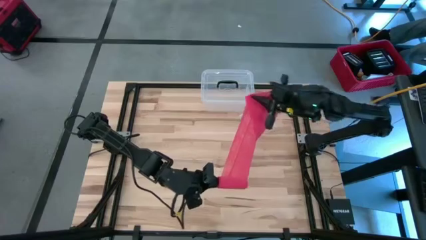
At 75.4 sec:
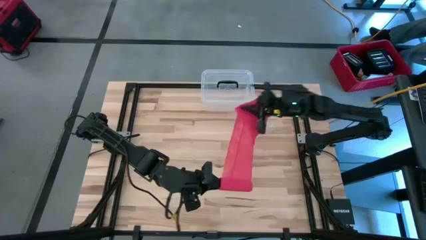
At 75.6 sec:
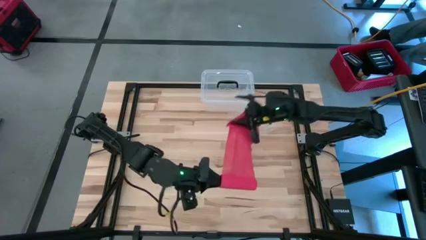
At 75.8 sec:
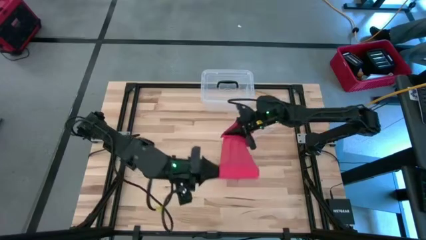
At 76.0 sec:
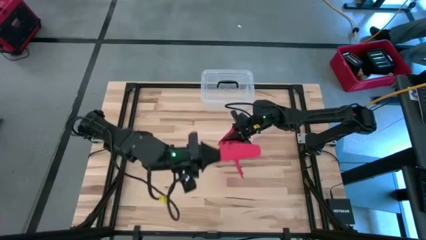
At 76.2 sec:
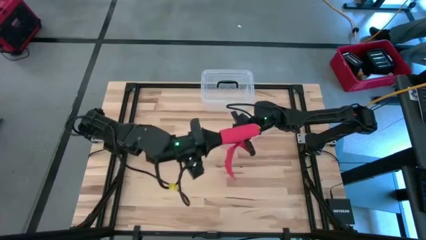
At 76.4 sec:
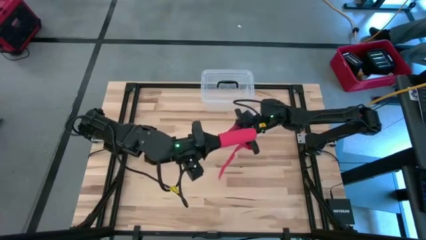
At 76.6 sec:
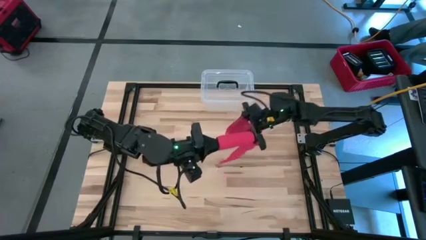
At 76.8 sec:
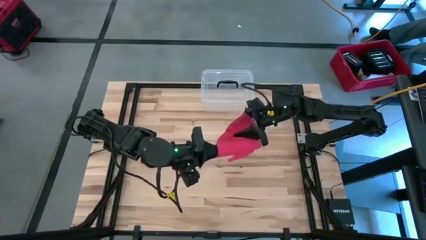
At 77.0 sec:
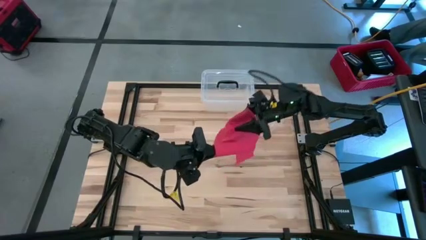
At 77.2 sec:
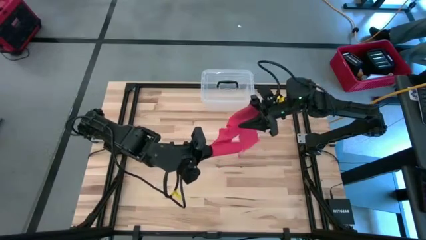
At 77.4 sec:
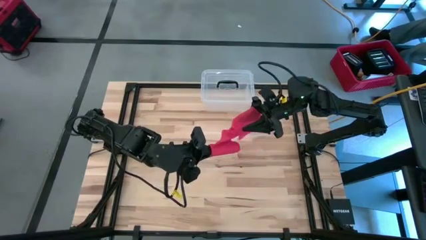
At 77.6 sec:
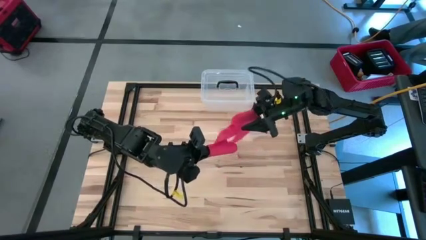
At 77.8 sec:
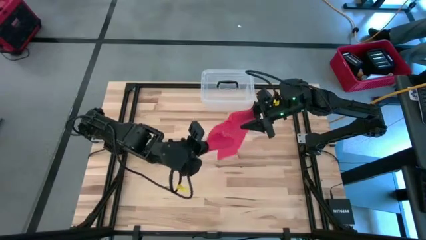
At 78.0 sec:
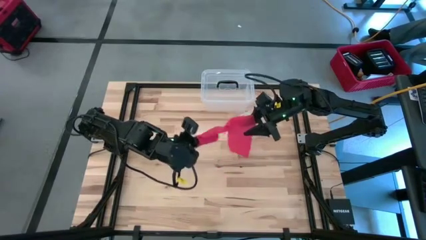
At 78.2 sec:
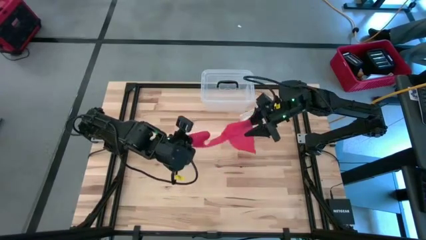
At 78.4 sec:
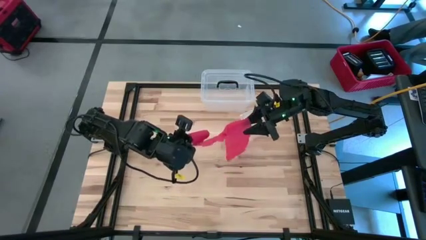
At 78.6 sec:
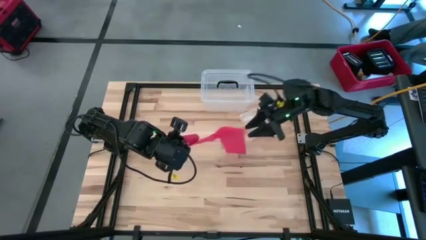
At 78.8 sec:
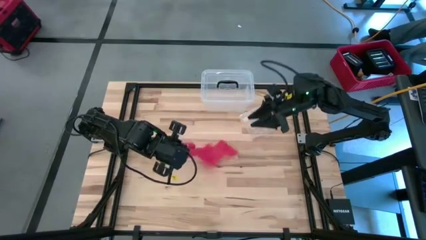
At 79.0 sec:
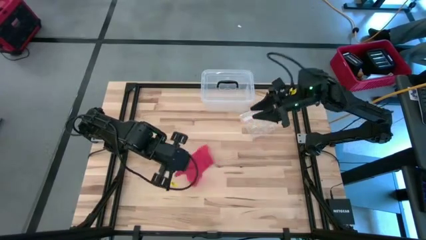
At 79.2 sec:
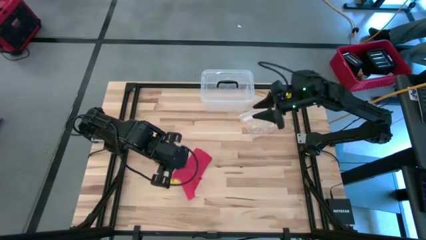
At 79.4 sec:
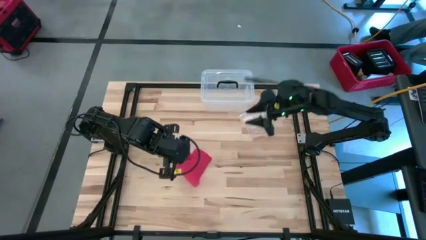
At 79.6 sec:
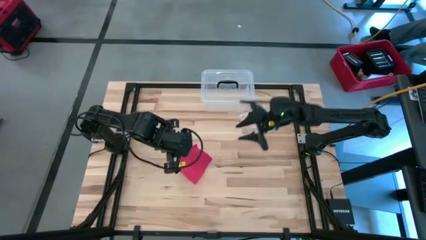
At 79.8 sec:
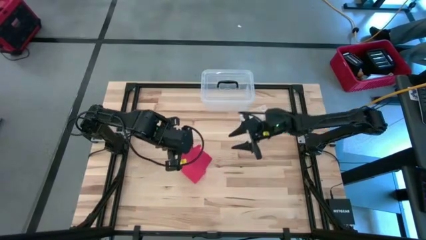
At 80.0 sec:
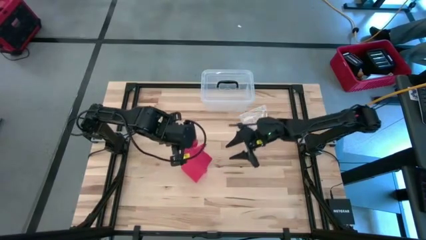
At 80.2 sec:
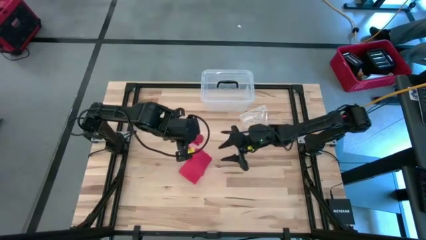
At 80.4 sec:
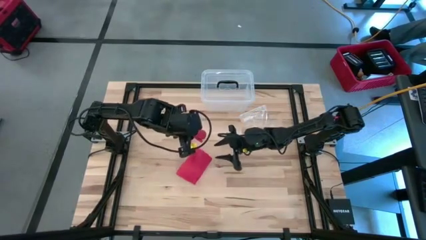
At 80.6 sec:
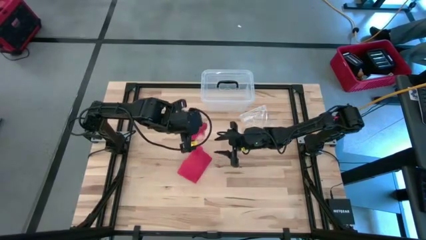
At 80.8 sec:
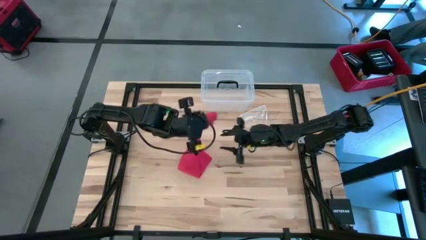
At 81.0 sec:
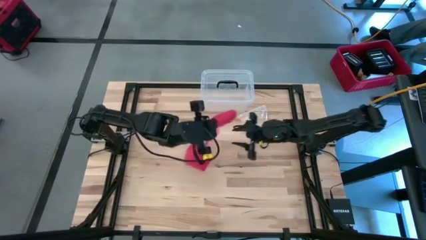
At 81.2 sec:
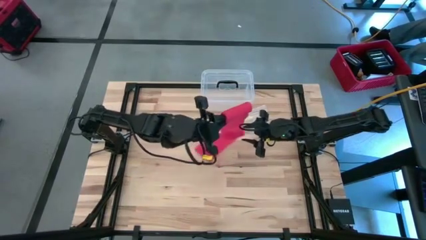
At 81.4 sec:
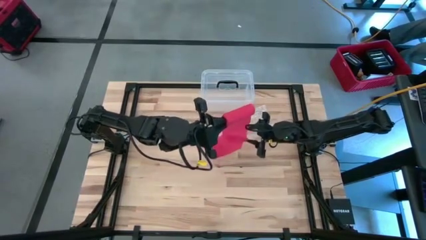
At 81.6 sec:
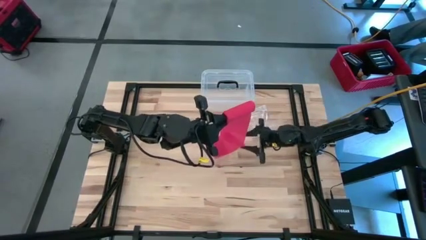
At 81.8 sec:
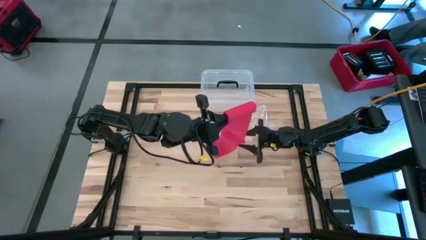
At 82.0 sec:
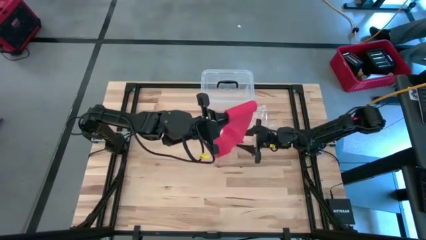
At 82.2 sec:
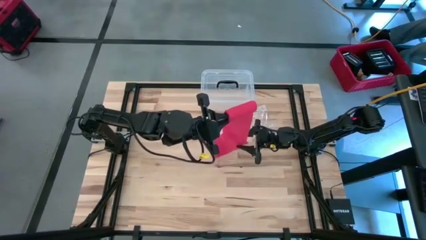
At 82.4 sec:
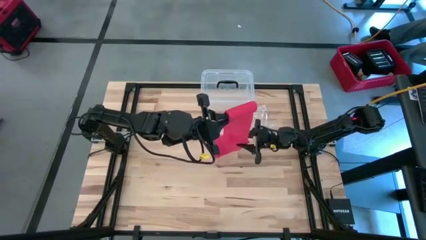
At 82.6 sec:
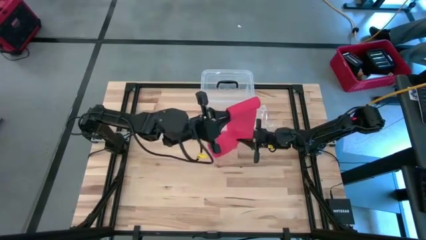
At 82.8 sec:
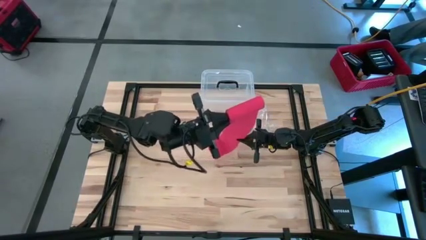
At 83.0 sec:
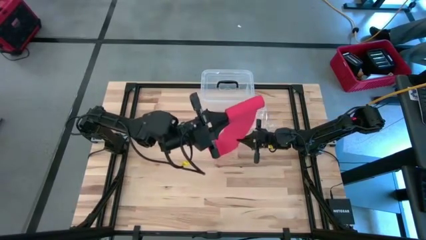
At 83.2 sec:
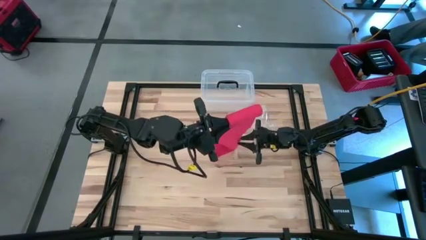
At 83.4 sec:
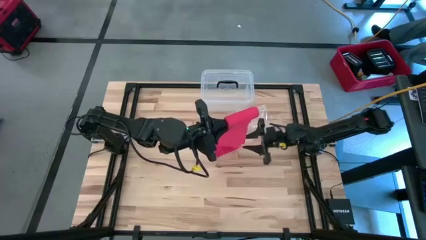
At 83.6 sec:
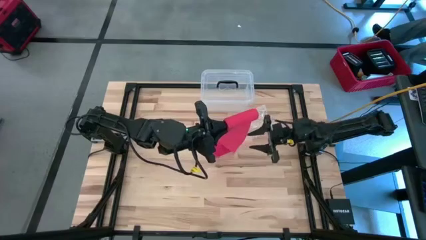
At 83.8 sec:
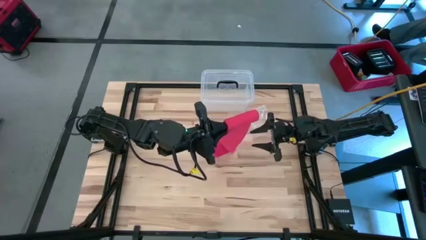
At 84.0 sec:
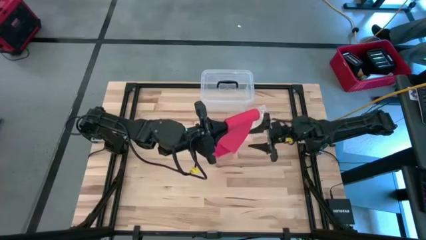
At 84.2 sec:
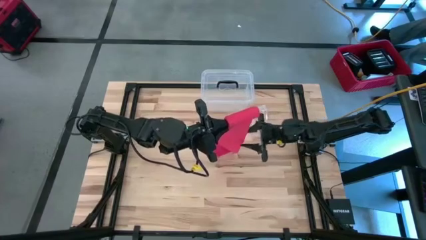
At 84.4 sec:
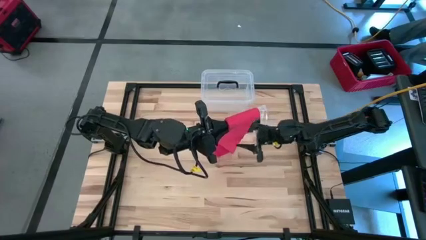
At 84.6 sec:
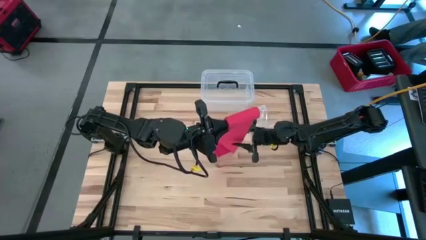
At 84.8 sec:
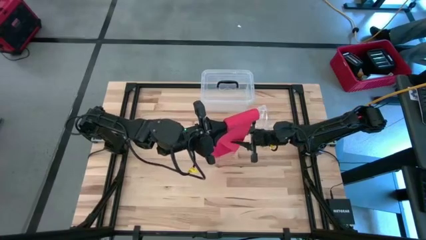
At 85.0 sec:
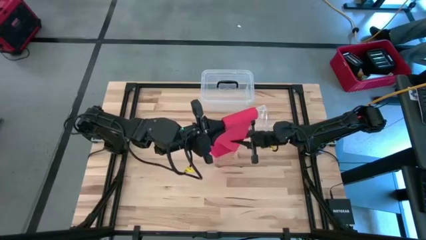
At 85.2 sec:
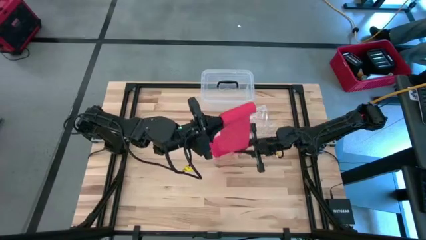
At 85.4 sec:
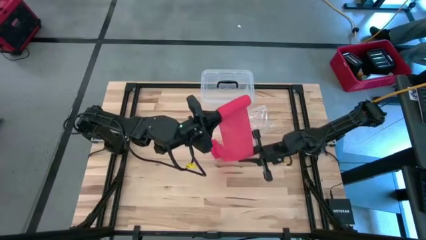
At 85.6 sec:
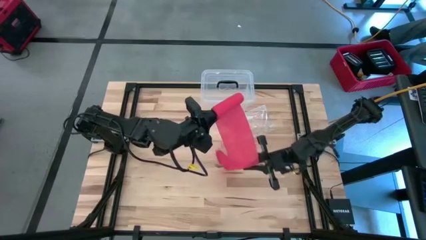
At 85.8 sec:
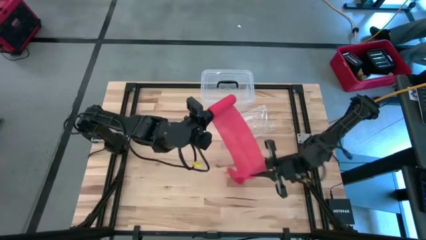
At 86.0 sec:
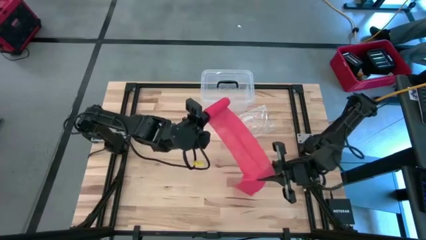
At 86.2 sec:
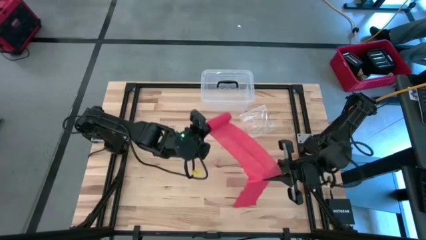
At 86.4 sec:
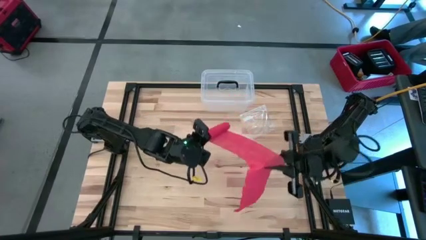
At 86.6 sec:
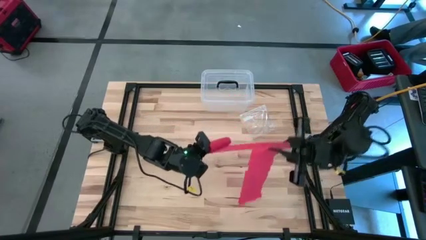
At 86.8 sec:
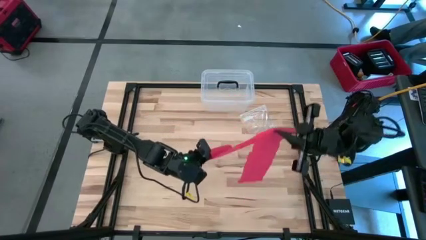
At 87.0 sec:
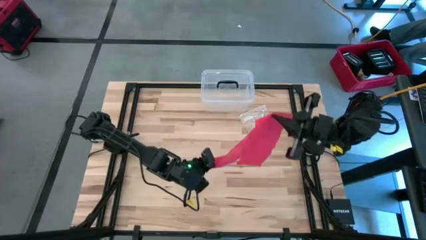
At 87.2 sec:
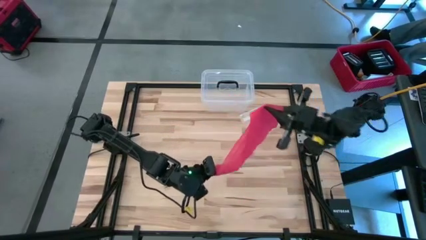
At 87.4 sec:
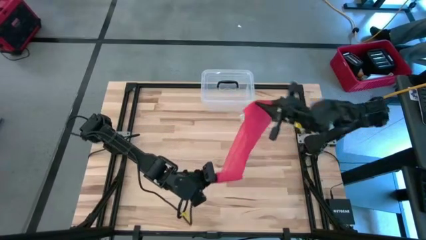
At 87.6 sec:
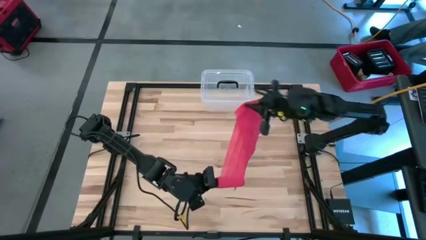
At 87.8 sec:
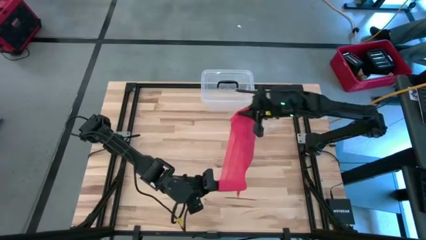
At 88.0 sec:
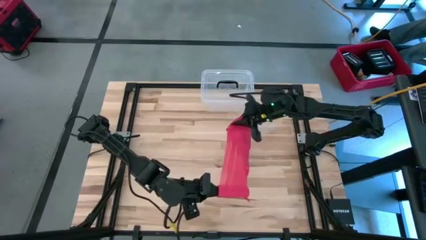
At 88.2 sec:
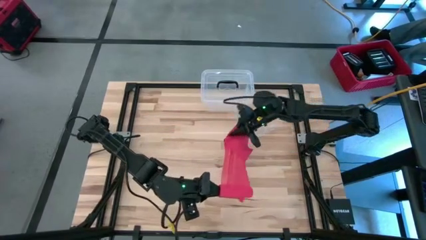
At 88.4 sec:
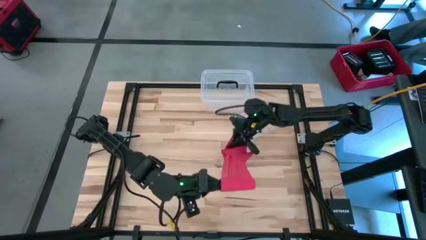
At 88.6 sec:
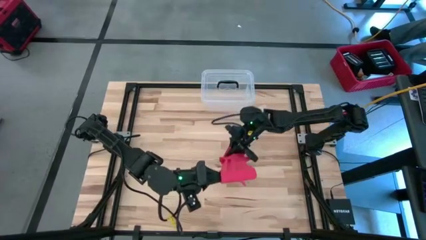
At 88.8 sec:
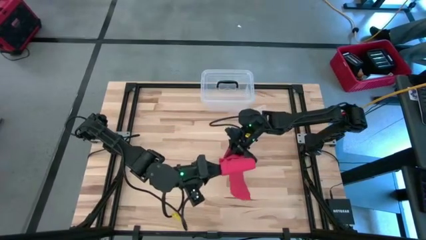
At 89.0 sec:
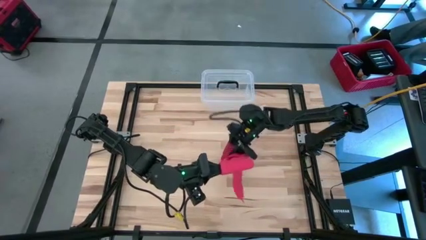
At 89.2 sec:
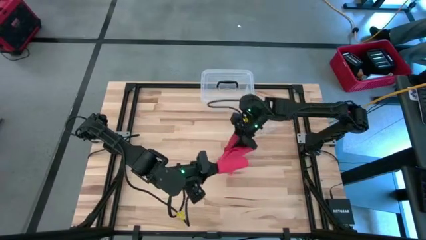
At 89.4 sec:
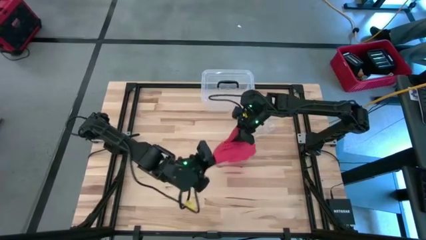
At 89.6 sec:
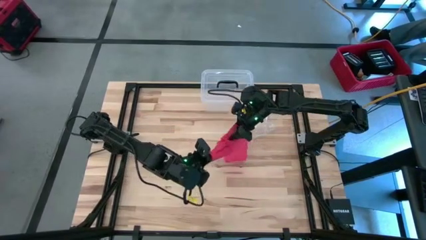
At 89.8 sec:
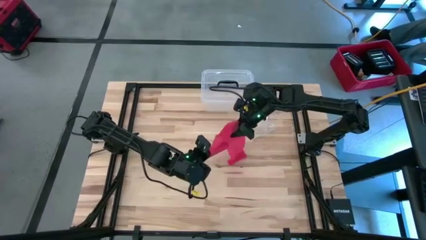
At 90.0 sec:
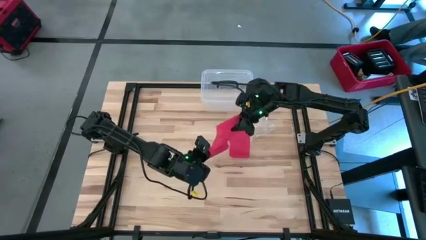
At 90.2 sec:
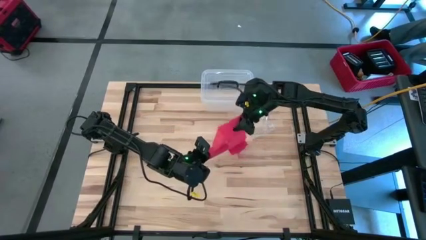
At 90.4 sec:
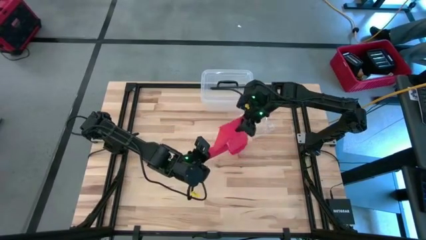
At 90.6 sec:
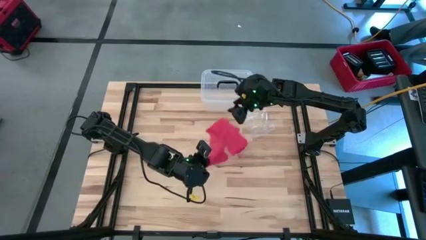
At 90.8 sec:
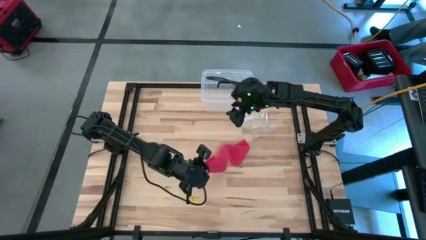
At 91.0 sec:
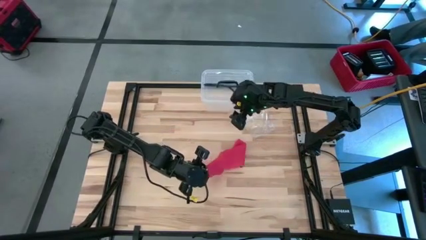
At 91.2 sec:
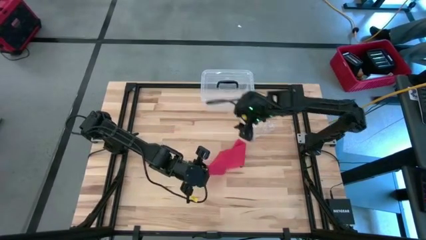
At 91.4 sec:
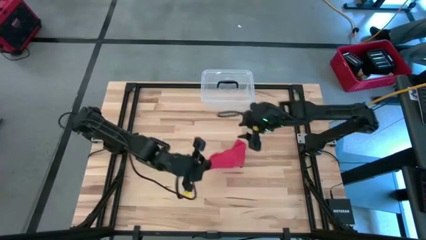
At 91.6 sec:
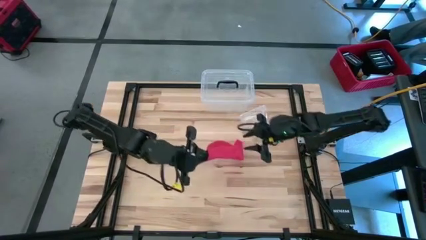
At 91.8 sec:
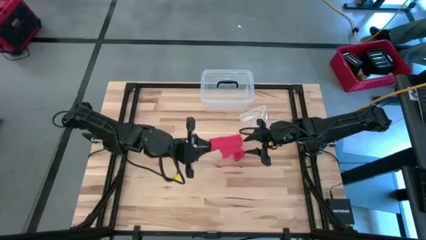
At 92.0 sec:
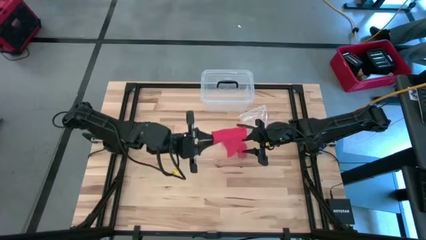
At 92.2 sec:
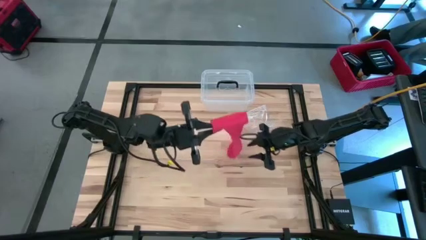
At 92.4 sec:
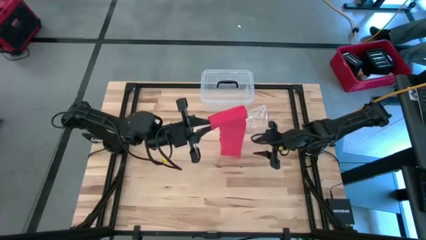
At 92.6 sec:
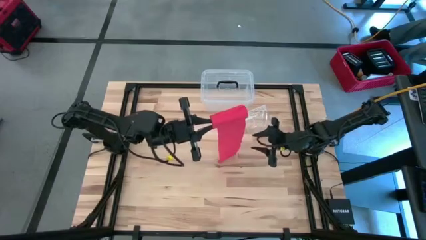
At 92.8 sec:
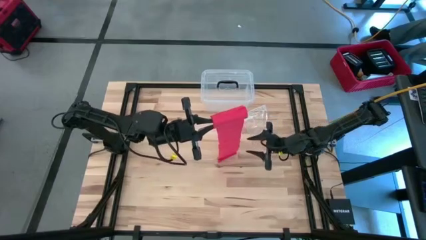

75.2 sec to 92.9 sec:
Task: Roll bandage
Roll the red bandage
